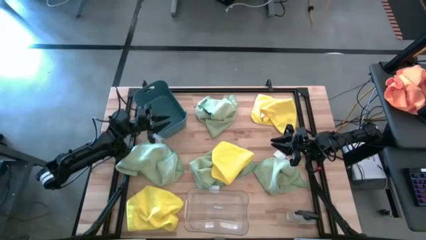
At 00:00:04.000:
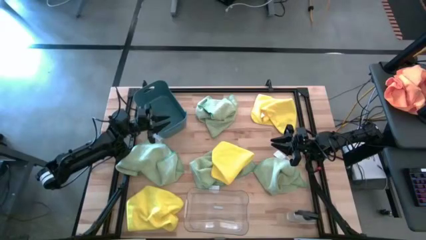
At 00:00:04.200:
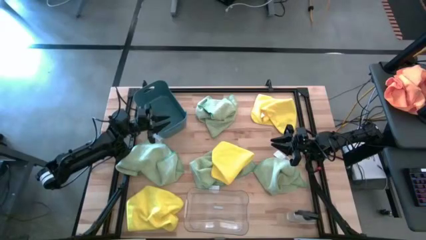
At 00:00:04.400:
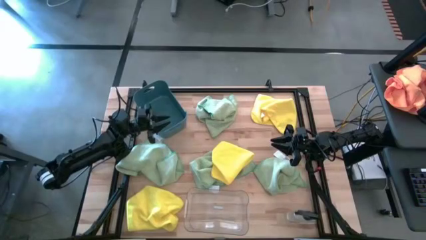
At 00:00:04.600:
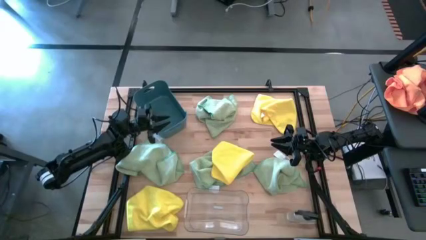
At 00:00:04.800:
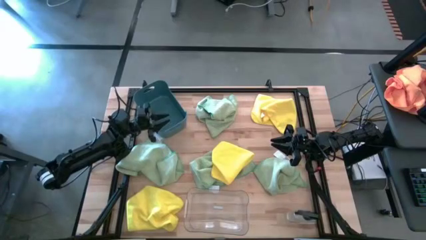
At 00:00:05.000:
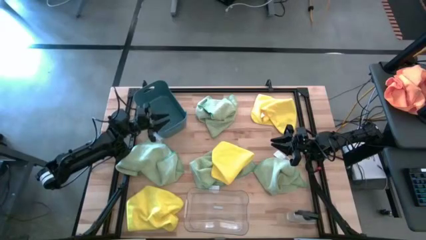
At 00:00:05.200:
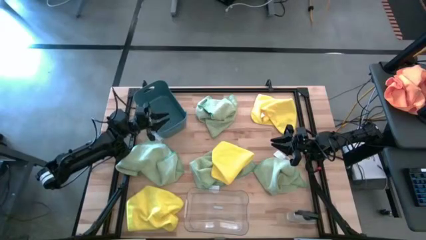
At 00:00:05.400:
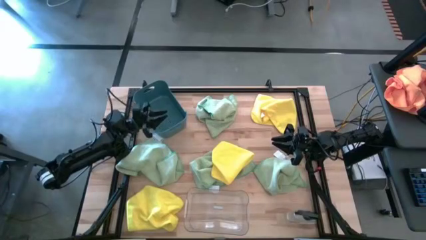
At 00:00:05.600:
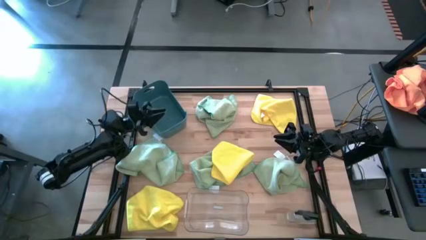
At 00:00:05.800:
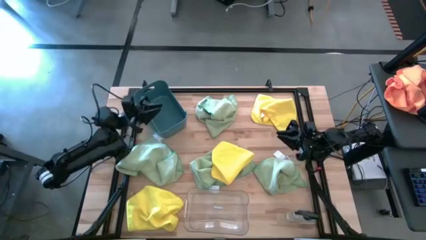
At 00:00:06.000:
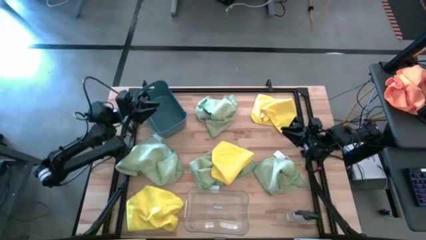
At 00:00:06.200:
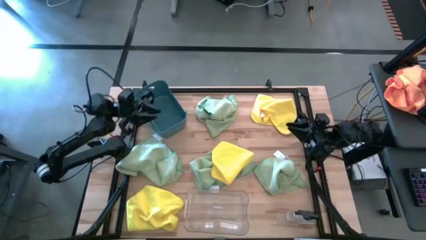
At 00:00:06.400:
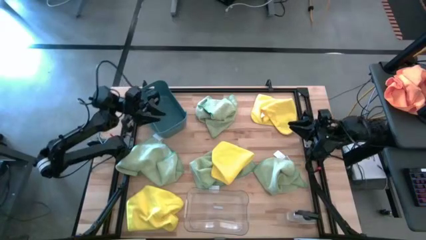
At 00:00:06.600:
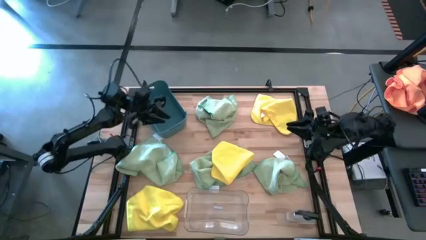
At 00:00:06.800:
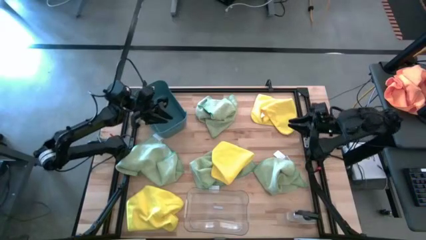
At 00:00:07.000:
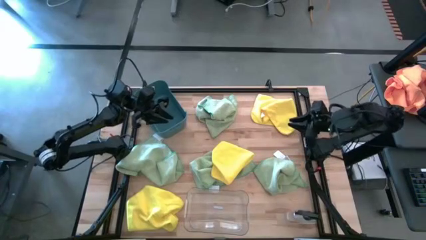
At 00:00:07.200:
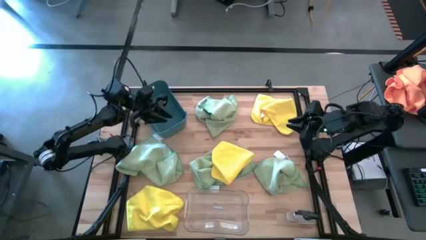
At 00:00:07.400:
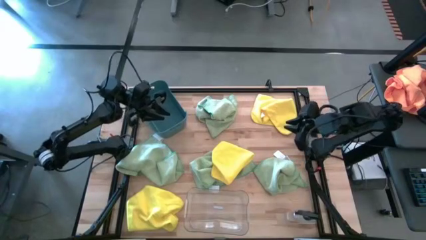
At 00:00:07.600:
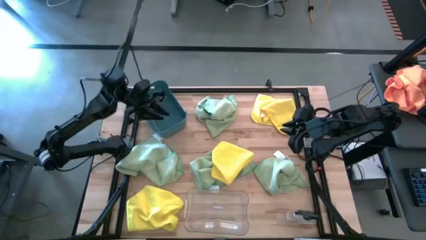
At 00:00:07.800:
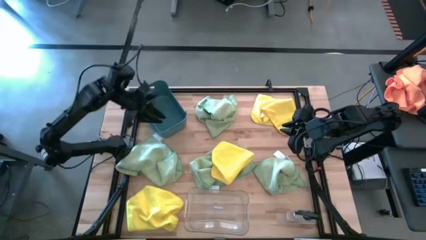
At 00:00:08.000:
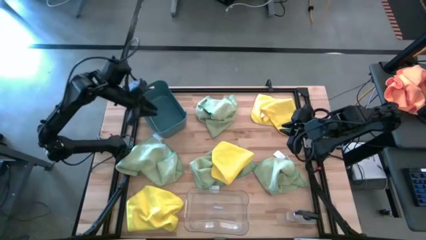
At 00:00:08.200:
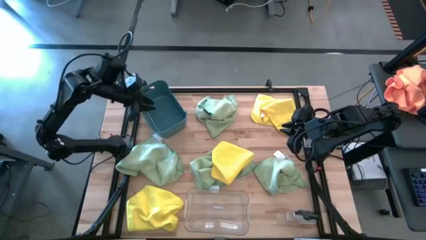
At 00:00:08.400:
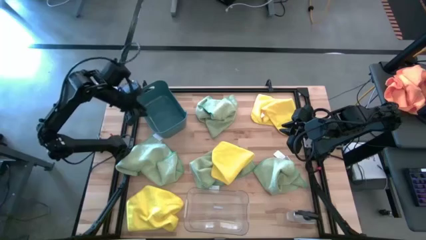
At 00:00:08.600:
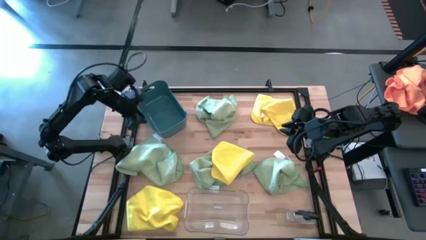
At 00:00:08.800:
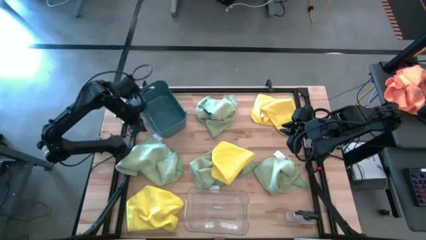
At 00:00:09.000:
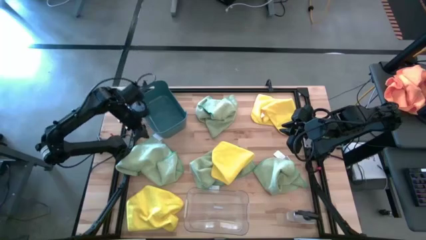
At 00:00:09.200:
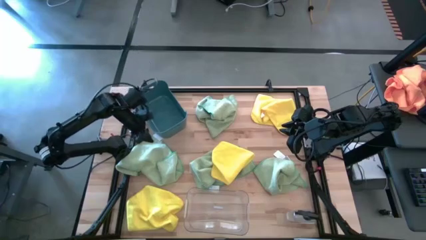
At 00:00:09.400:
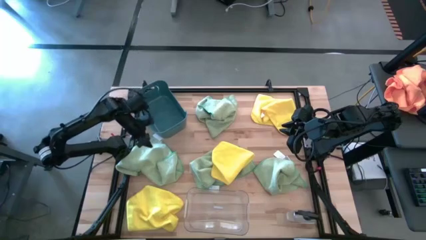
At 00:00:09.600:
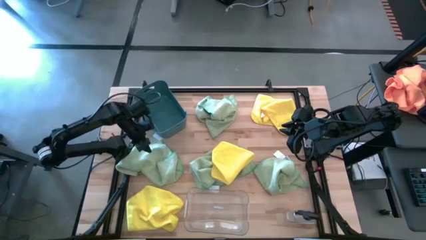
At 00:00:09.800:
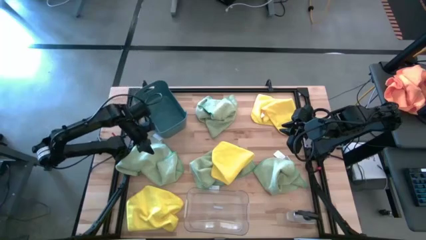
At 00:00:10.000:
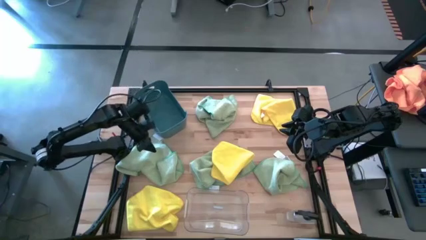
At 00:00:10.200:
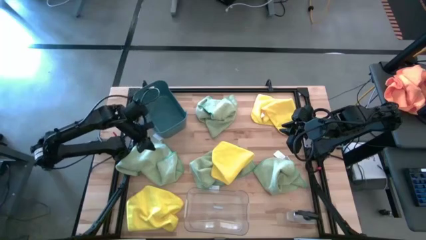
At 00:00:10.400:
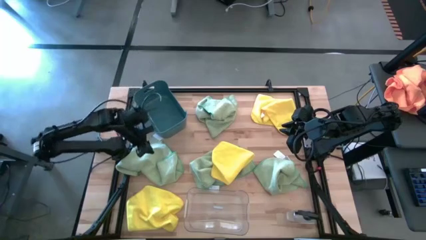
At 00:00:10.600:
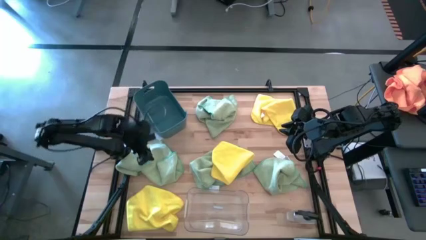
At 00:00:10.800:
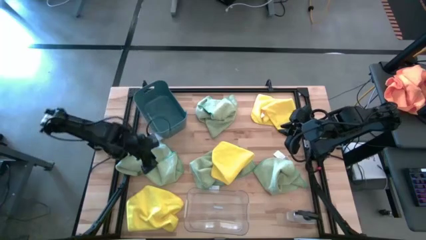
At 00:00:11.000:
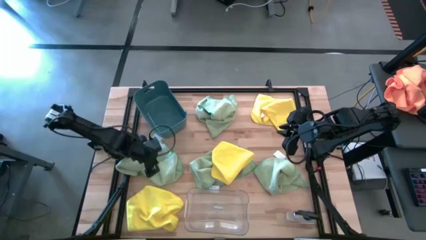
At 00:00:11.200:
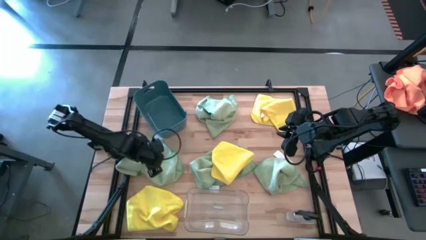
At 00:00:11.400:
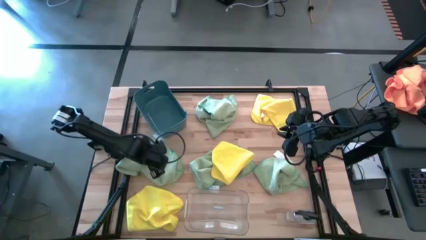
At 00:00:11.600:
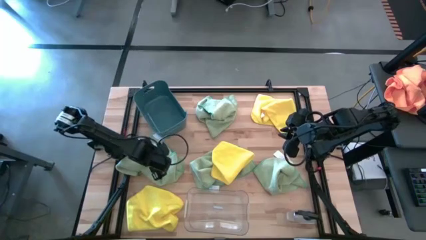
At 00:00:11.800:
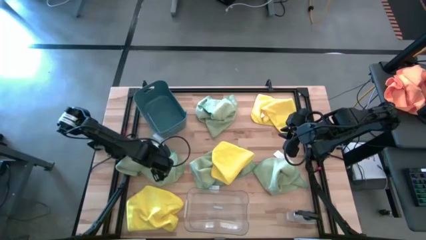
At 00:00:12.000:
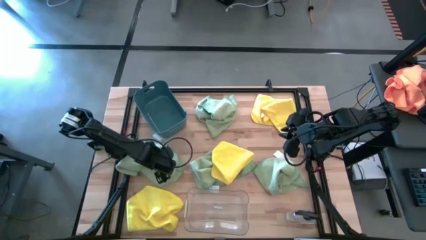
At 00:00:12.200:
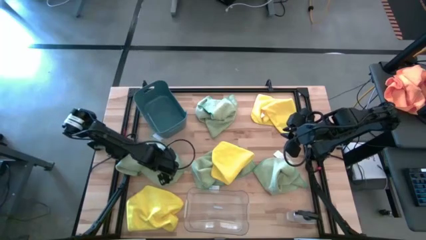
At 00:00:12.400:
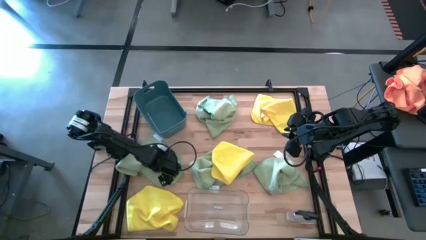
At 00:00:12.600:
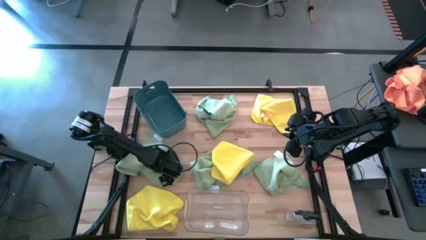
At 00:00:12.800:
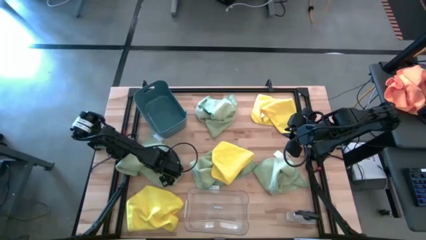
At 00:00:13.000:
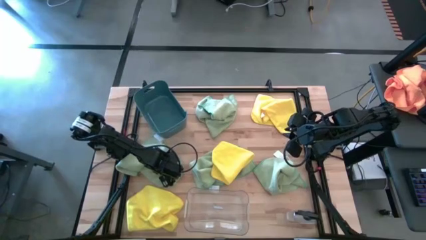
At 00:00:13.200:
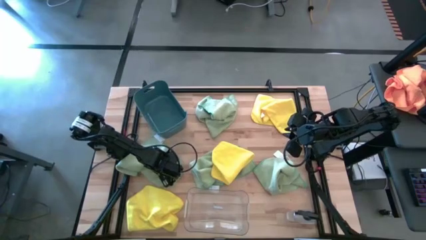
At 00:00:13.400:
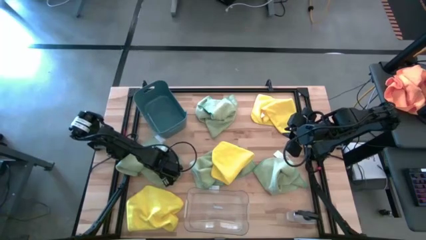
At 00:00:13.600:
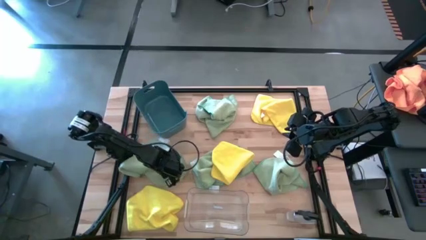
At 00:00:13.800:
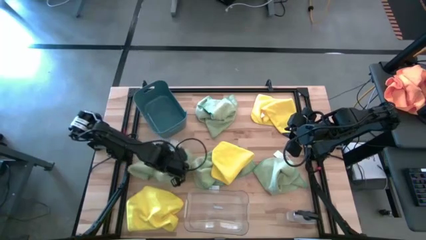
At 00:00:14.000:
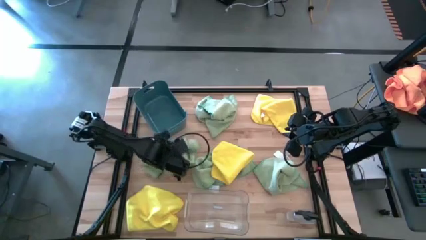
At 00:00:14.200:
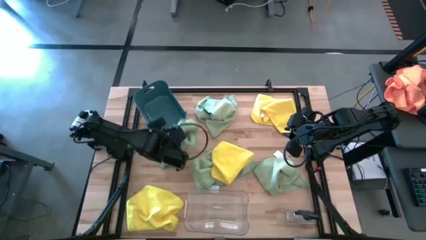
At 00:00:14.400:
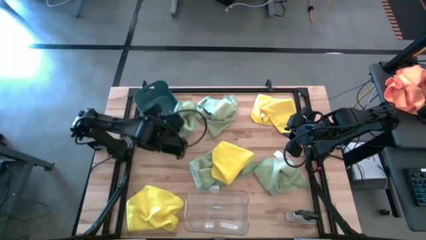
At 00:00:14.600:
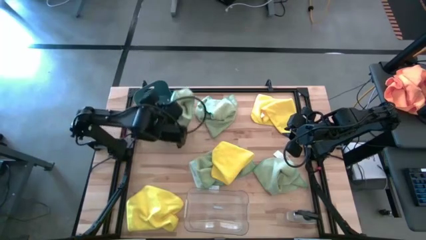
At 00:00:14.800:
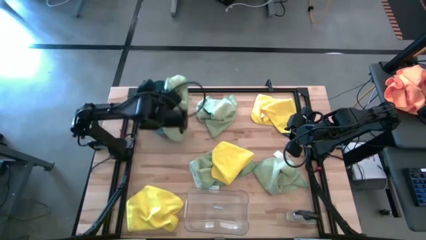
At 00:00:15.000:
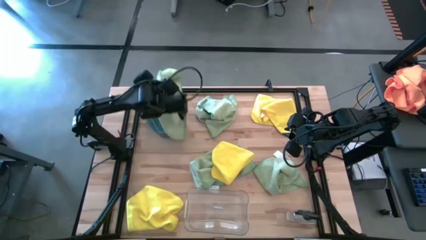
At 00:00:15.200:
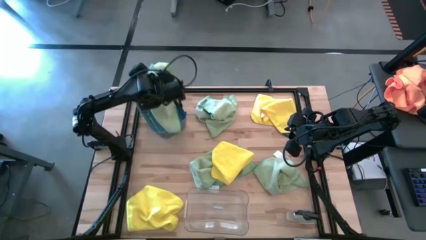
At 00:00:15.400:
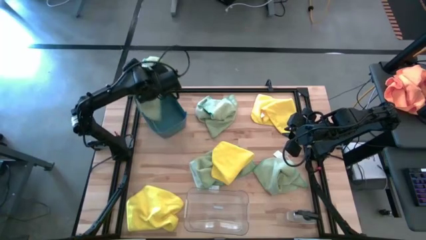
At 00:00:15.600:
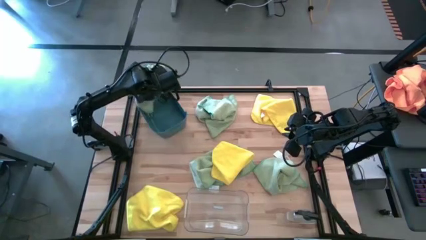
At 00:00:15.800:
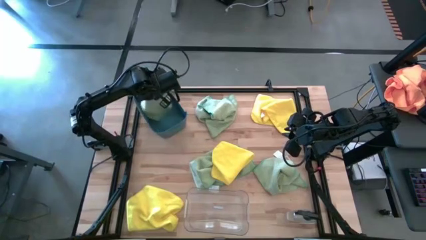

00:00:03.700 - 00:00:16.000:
Task: Sort microfiber towel by color & place in baskets
Put the bottom left green towel into the blue bin

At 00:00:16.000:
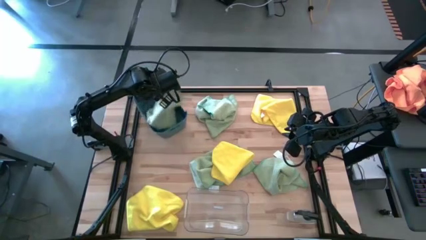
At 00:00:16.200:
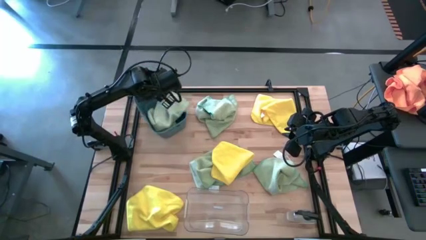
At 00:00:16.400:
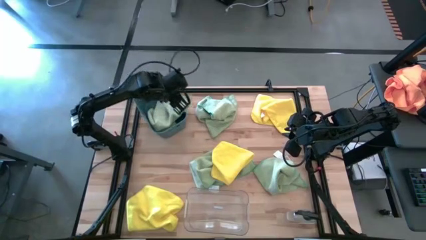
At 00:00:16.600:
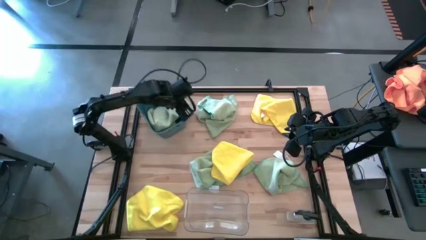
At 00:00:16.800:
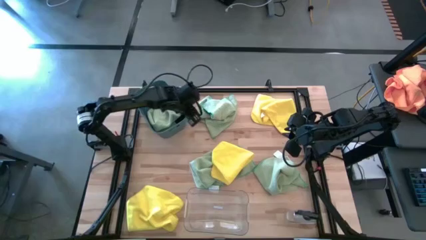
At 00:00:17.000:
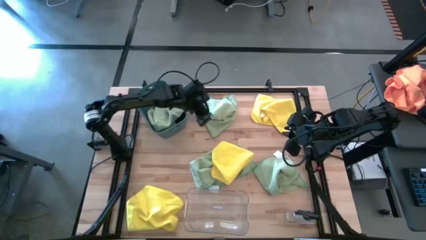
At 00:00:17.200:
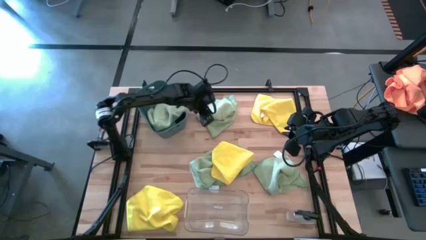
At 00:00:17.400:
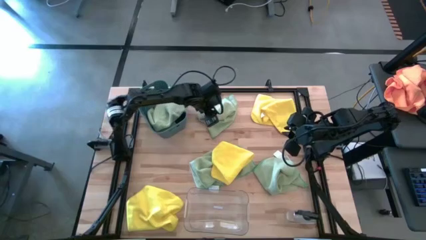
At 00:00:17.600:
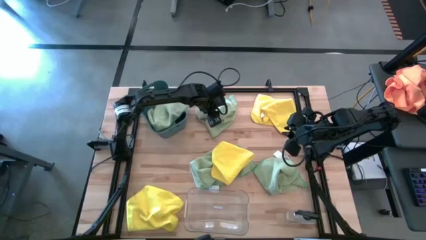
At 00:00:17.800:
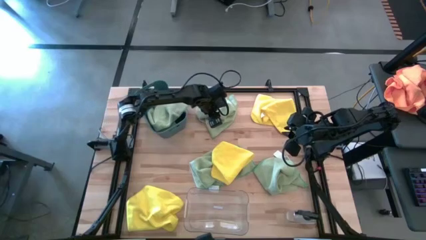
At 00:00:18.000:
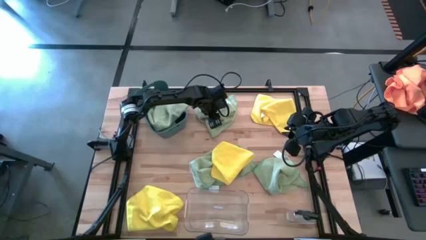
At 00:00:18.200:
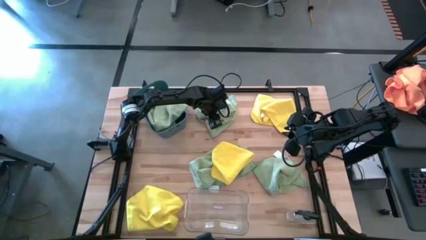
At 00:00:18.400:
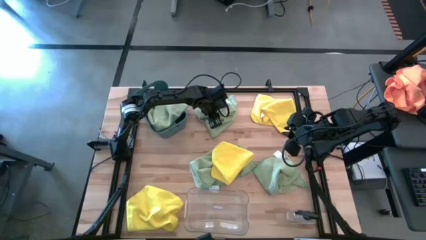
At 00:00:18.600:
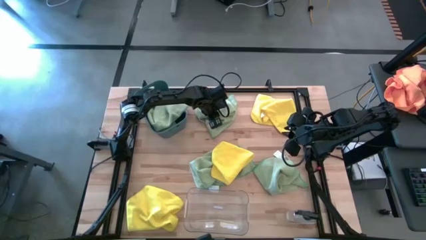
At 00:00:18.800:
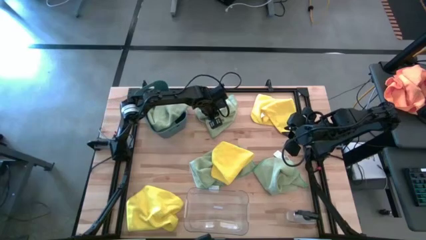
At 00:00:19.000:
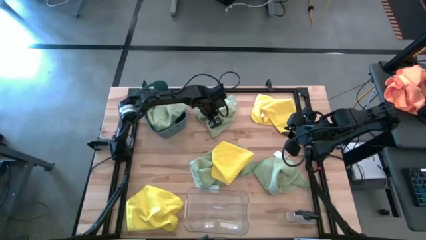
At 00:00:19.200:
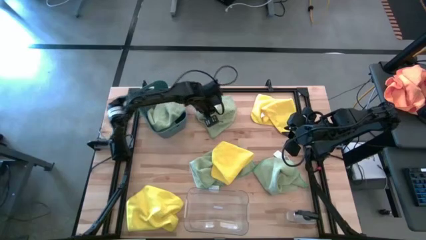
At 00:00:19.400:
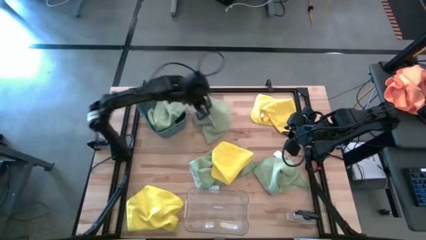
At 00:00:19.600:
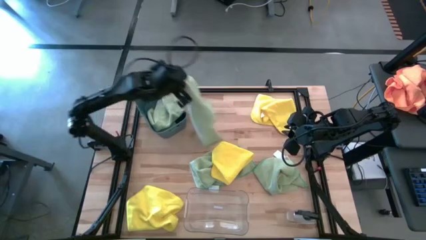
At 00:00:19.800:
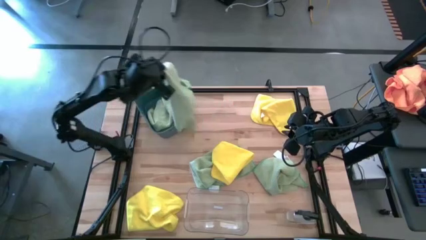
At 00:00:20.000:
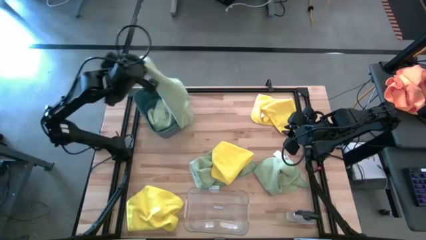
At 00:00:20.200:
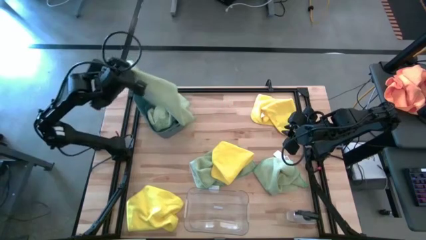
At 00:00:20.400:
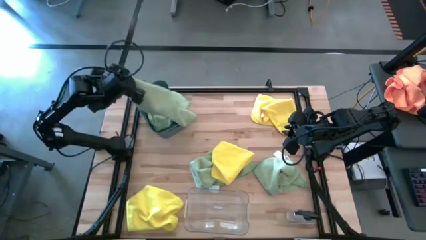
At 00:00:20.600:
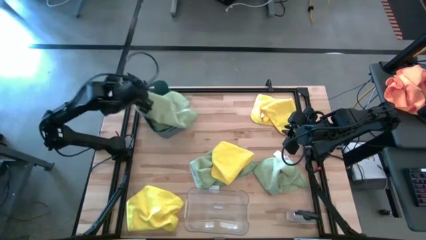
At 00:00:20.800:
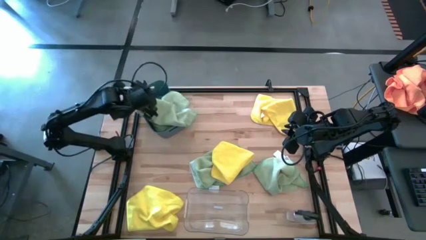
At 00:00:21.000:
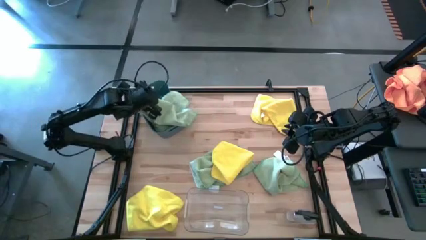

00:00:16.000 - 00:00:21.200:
Put the top left green towel into the blue bin
